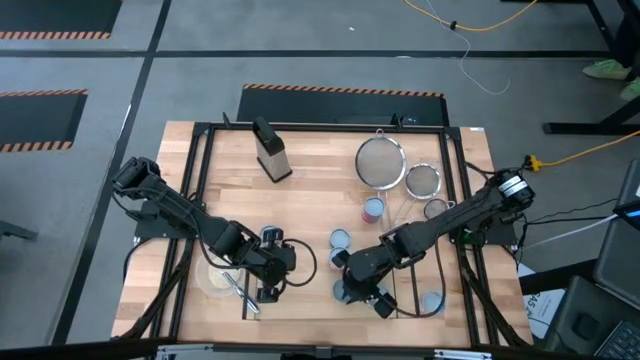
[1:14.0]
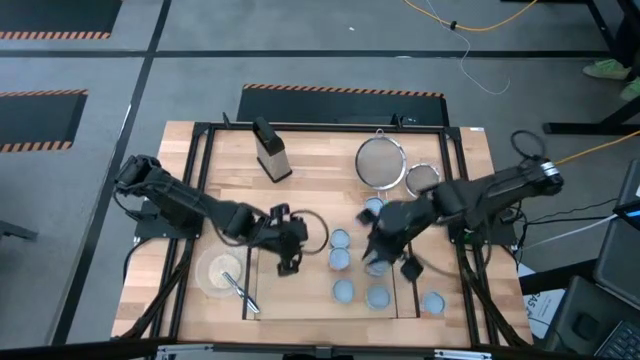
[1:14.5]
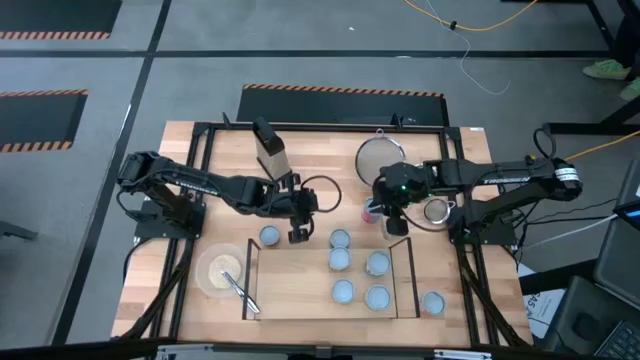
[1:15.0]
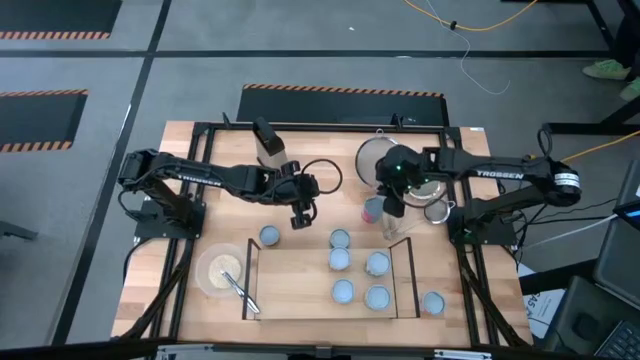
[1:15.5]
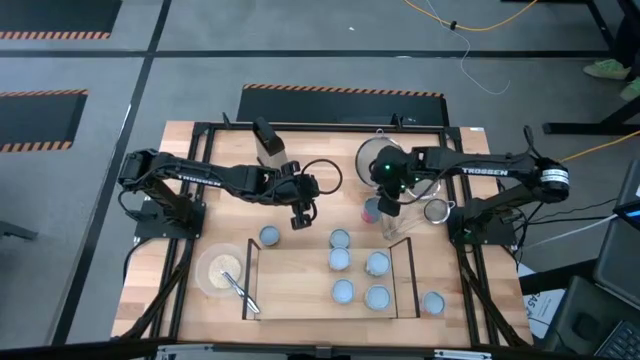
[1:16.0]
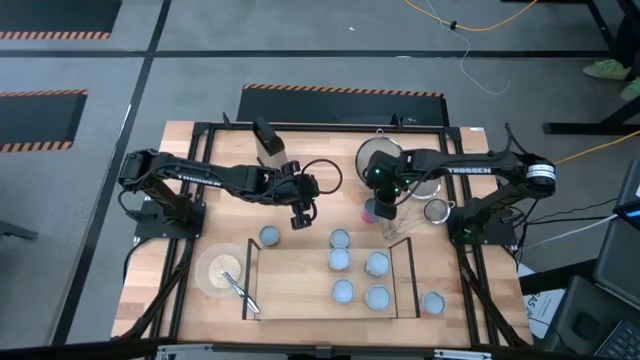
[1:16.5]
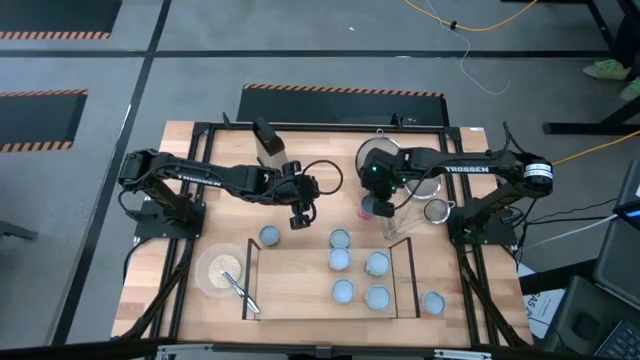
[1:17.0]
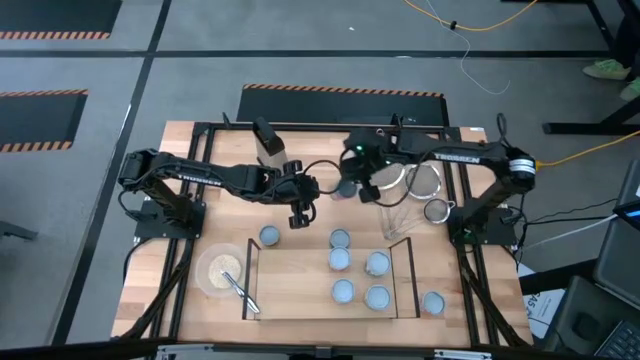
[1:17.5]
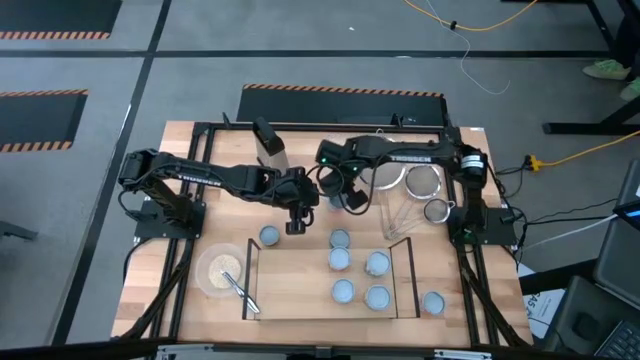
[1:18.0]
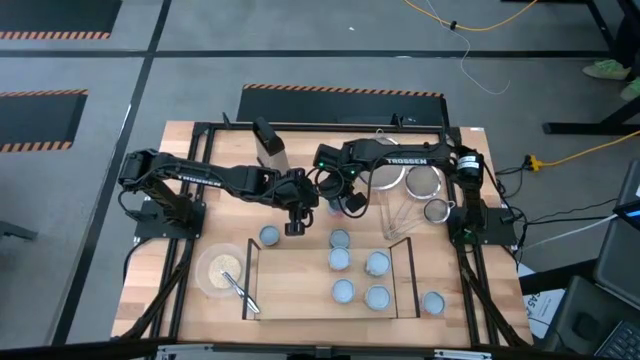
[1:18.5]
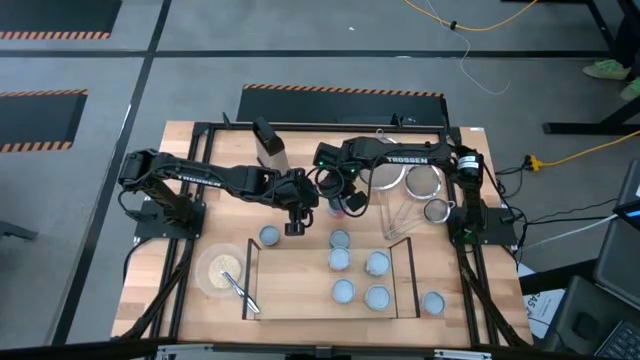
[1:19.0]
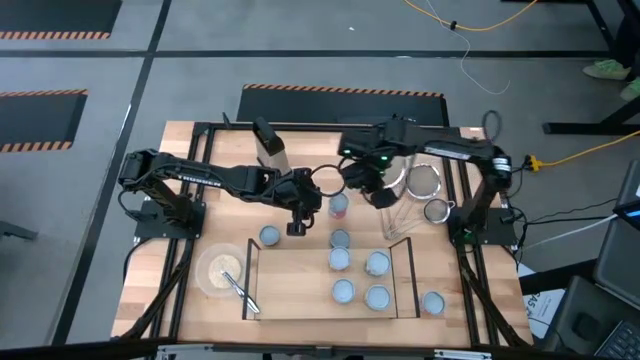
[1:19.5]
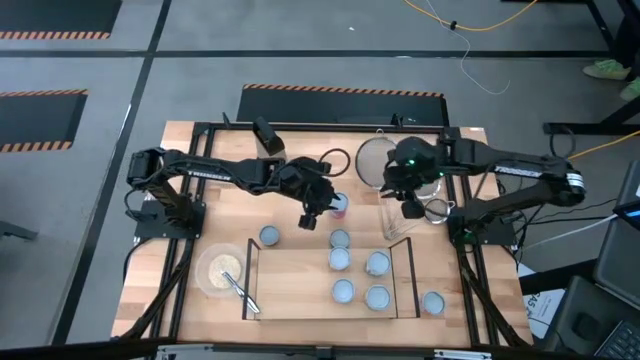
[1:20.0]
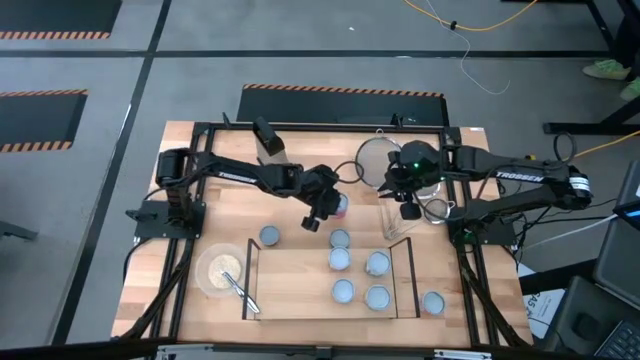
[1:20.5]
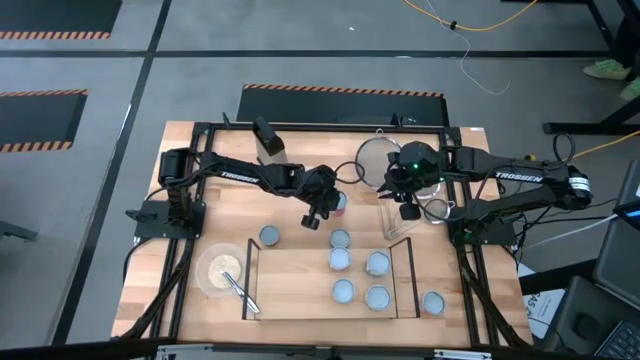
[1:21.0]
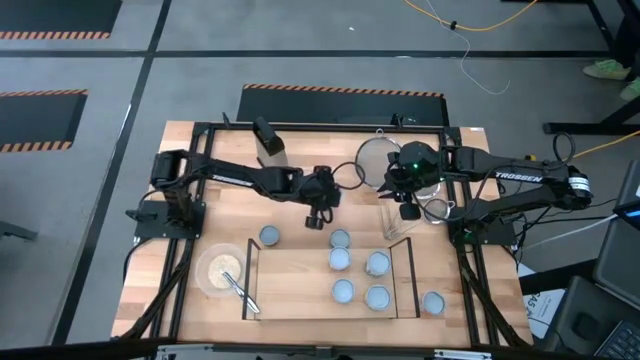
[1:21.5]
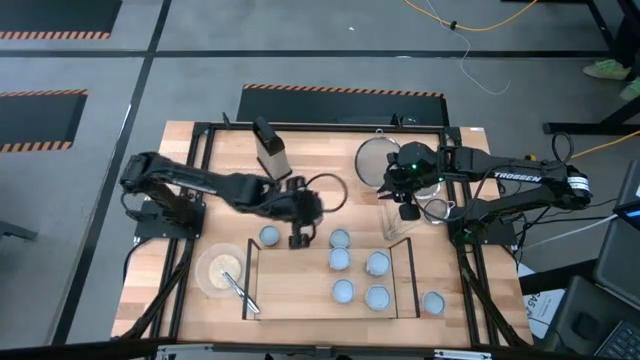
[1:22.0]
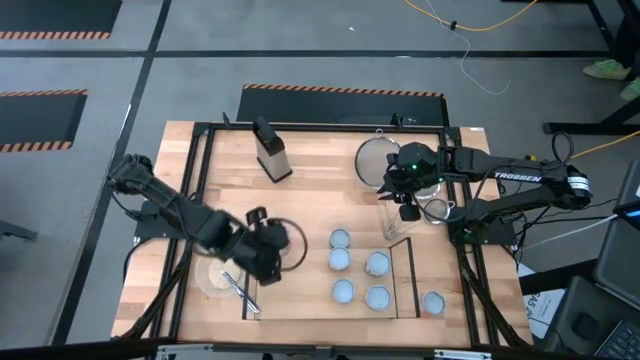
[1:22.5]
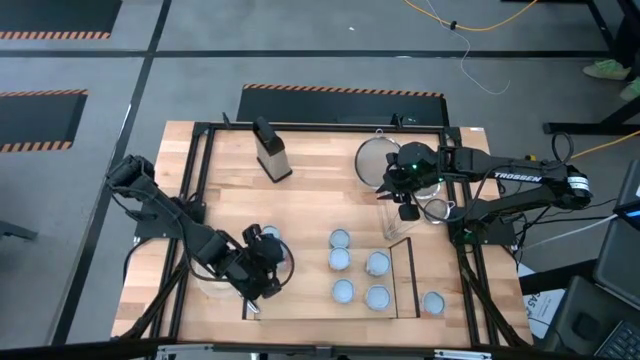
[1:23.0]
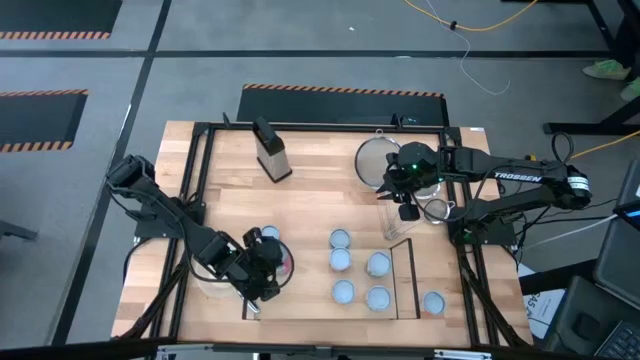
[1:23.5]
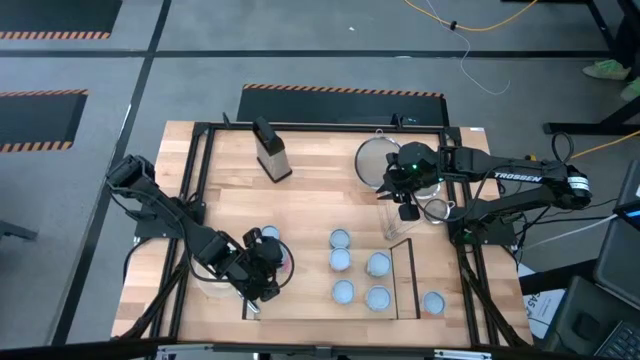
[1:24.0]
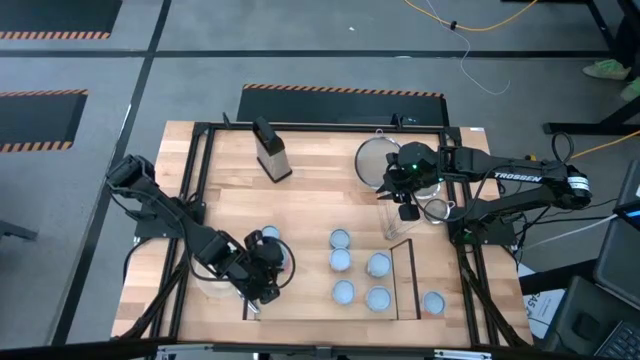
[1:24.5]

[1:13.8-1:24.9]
Task: Pick and place cans onto a shelf
Put the canned chicken soup on the shelf

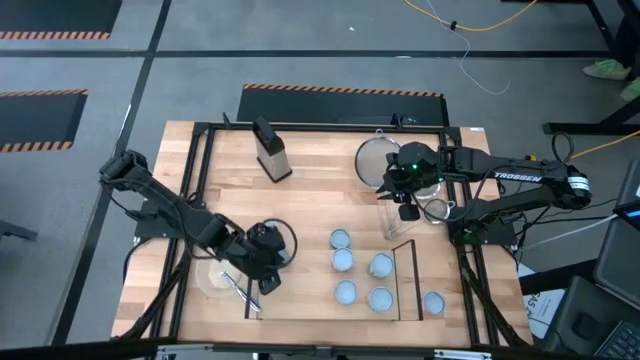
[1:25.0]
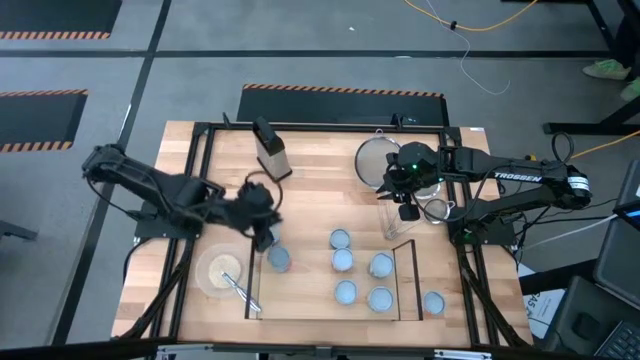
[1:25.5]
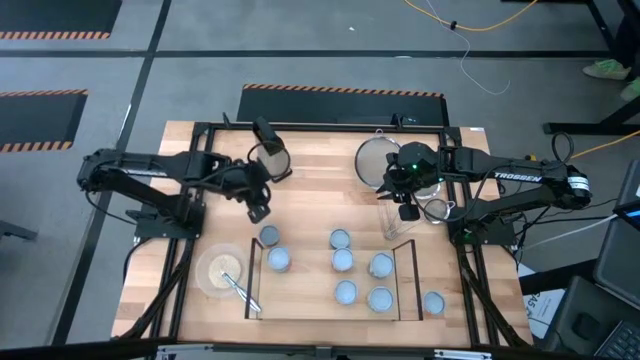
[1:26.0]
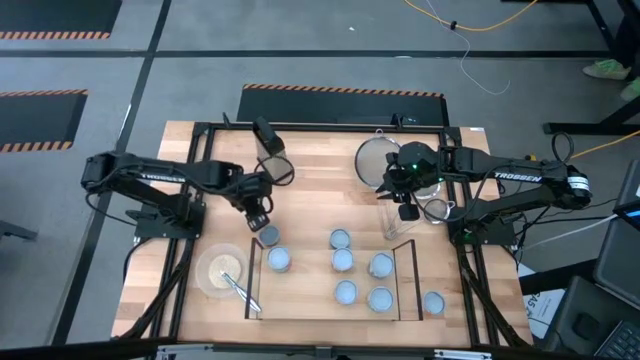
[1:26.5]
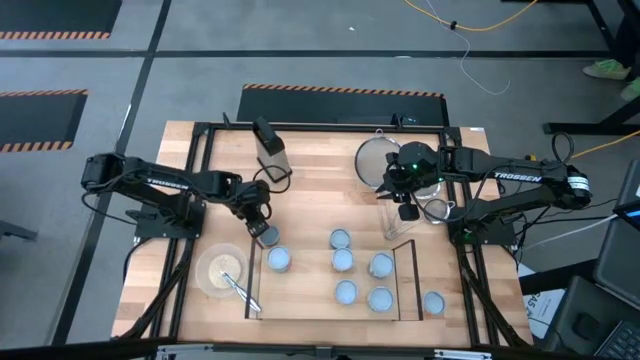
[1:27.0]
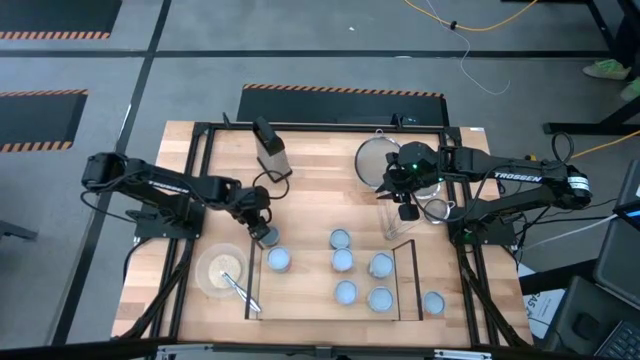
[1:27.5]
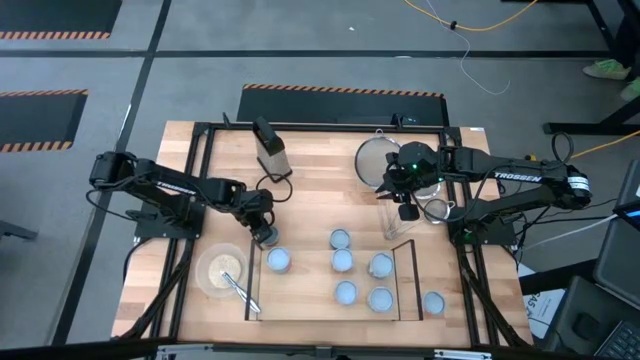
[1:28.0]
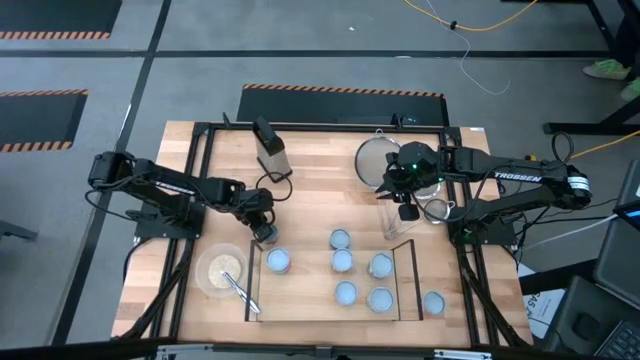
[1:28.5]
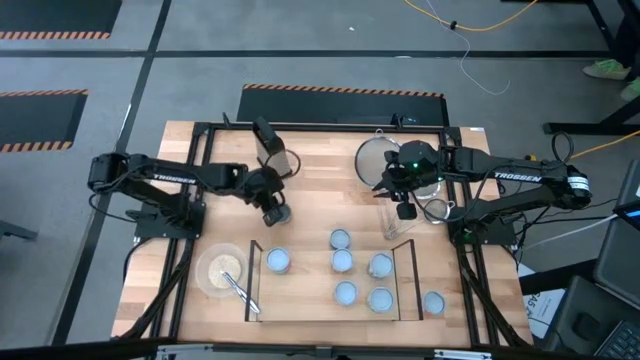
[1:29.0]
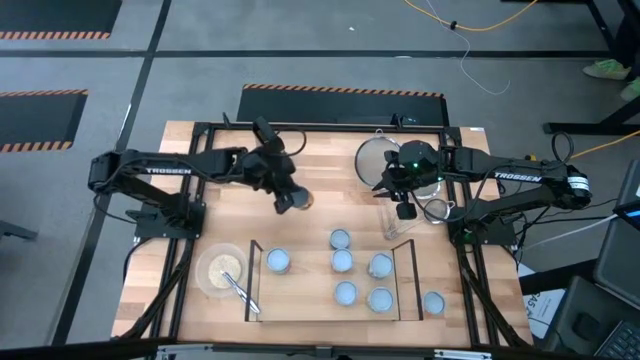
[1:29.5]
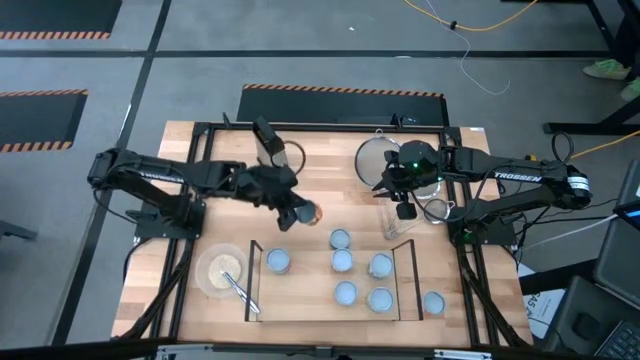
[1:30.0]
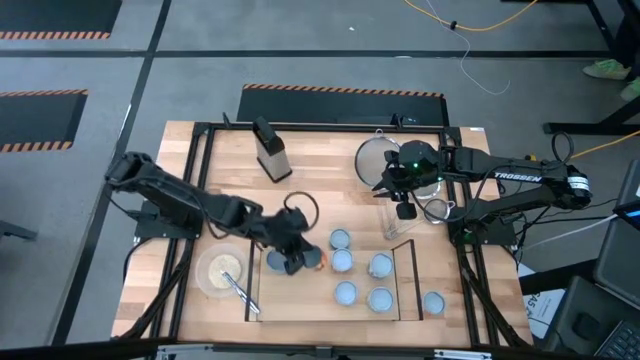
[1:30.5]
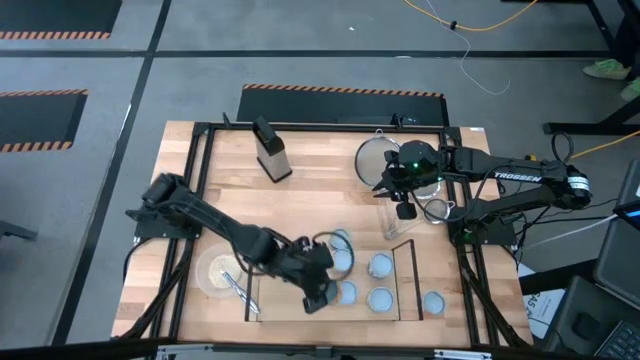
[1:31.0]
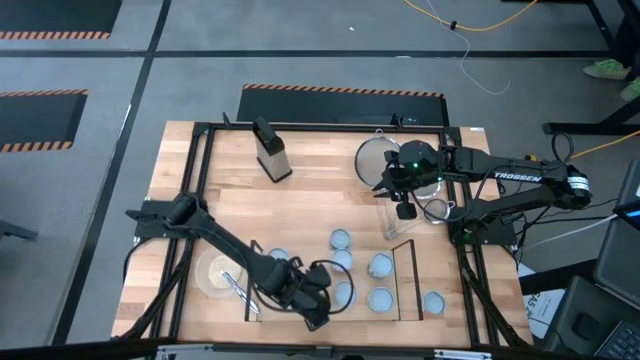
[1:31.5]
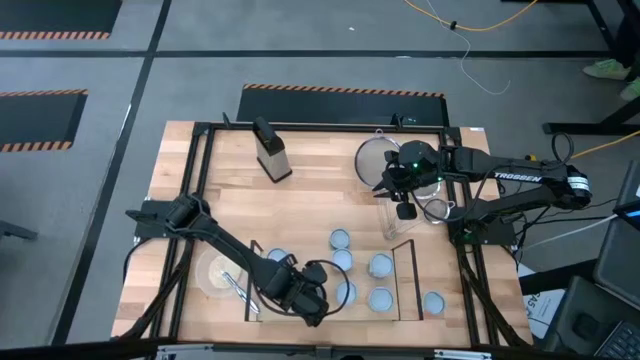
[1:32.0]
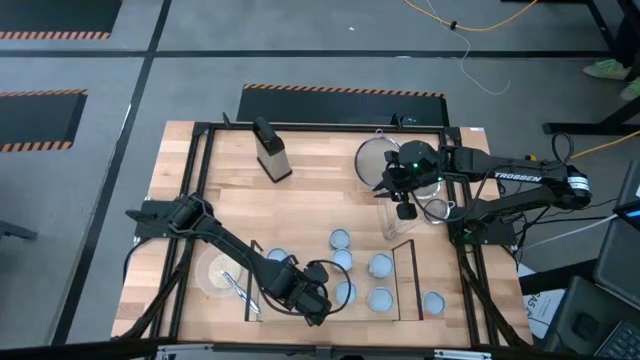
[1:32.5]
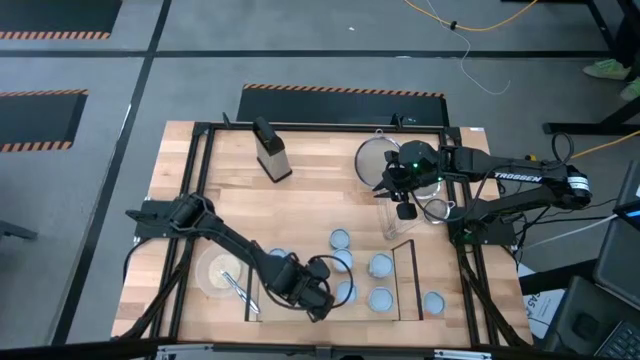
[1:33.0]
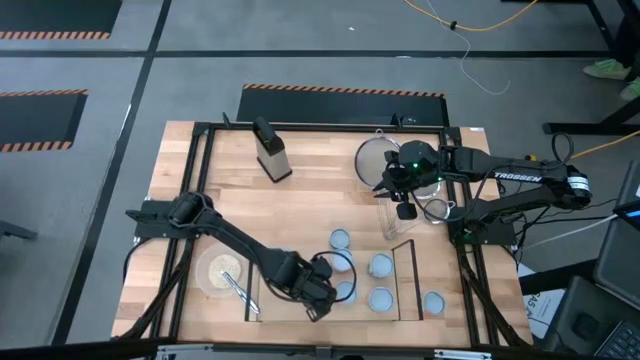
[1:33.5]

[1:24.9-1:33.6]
Put the canned pineapple rings on the shelf
